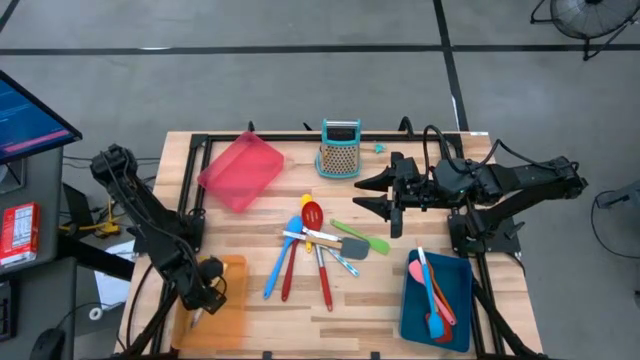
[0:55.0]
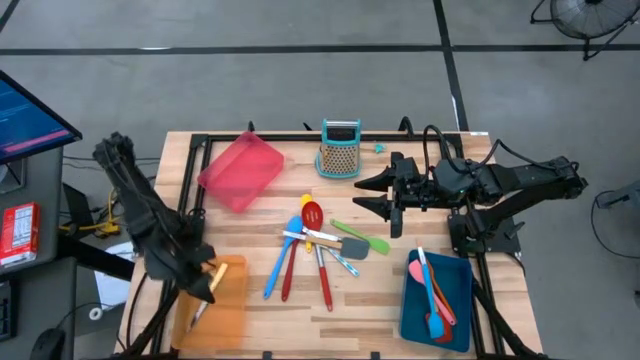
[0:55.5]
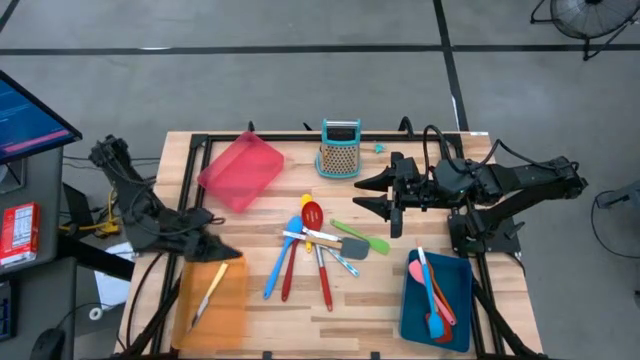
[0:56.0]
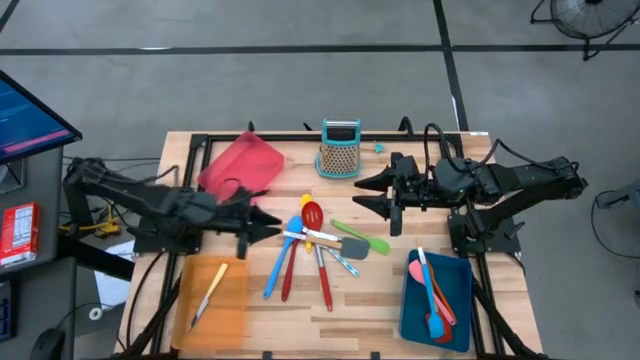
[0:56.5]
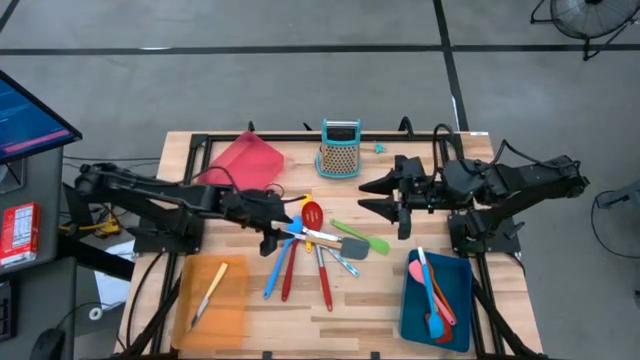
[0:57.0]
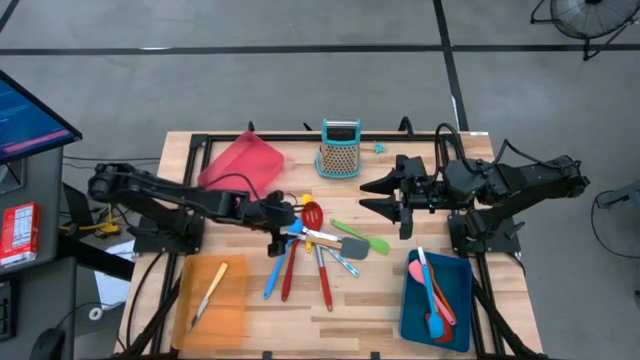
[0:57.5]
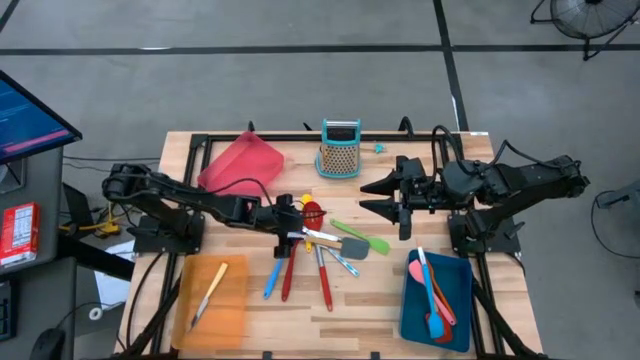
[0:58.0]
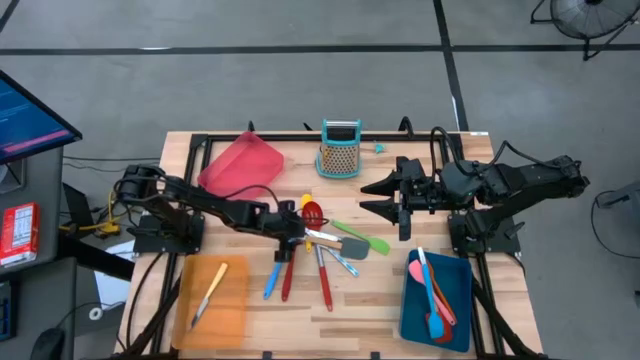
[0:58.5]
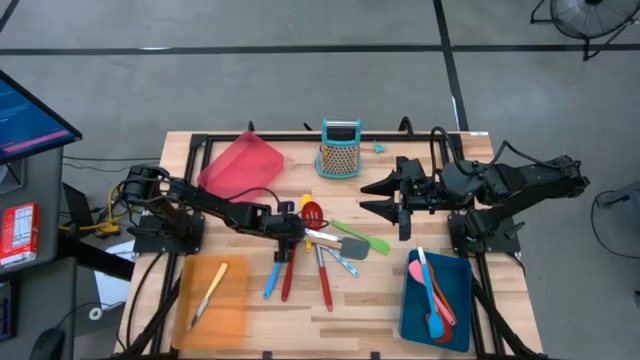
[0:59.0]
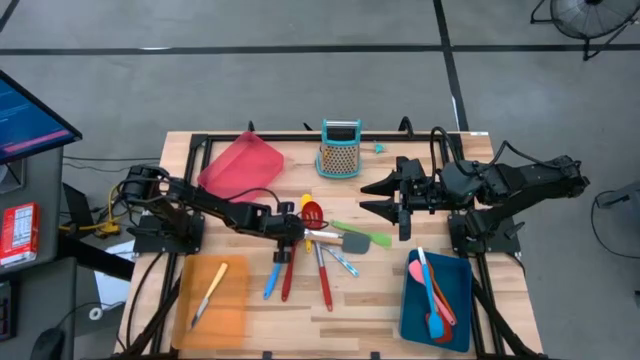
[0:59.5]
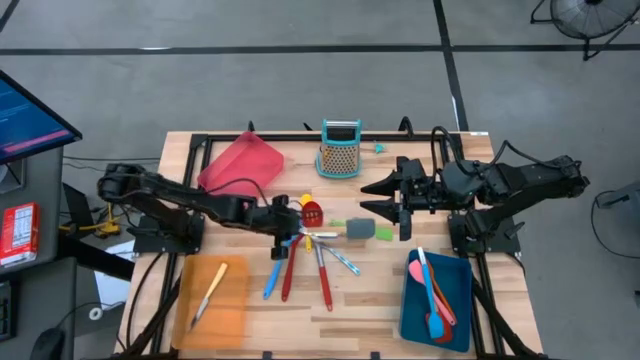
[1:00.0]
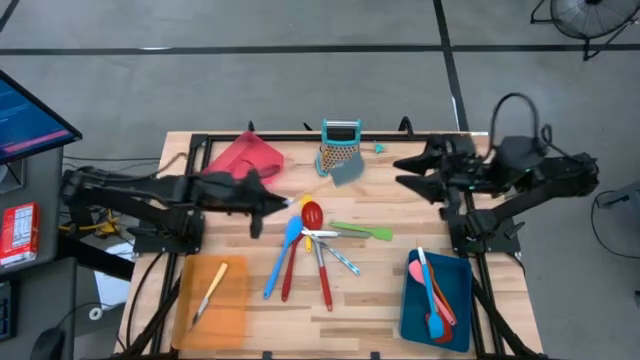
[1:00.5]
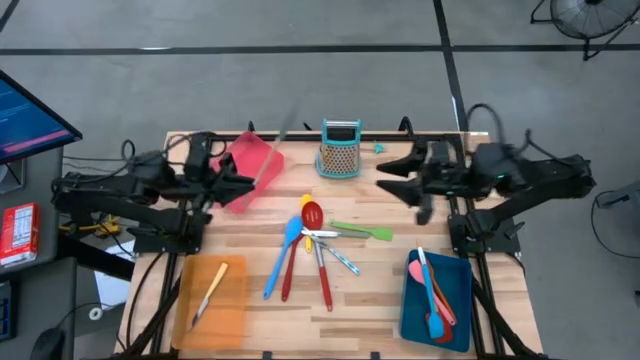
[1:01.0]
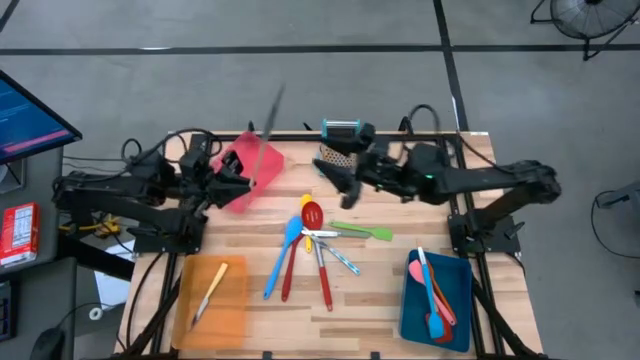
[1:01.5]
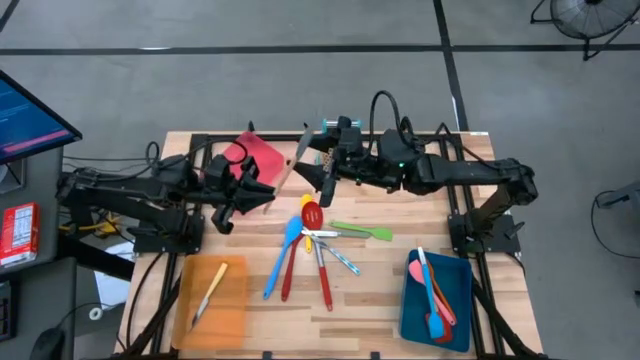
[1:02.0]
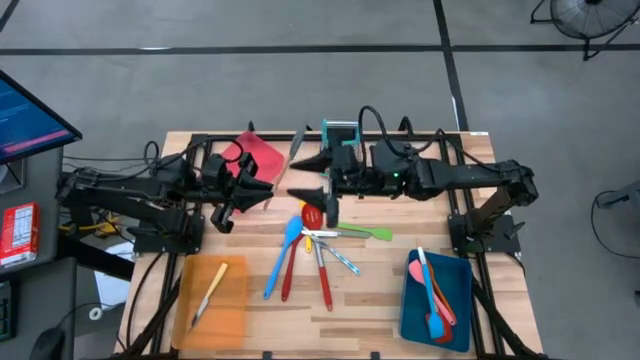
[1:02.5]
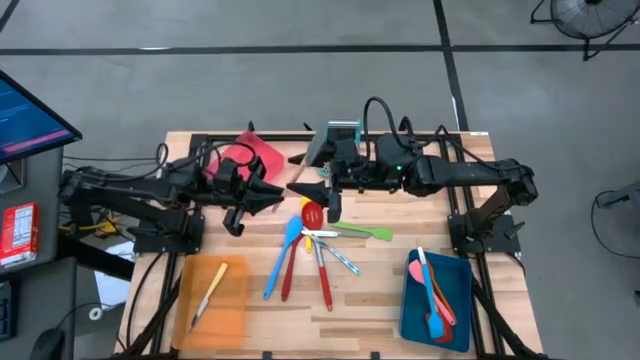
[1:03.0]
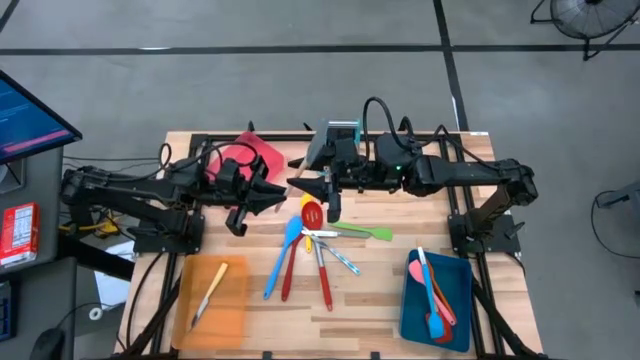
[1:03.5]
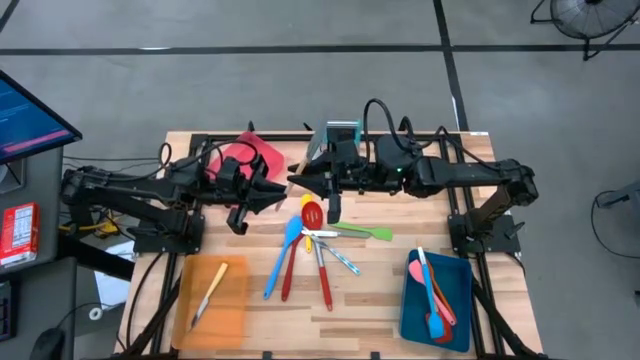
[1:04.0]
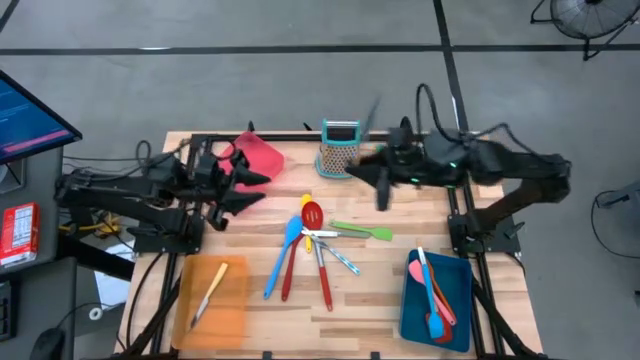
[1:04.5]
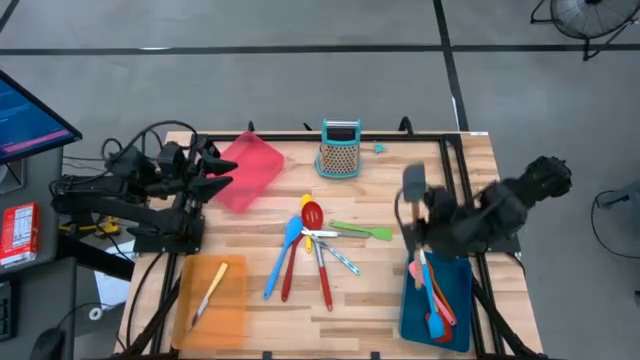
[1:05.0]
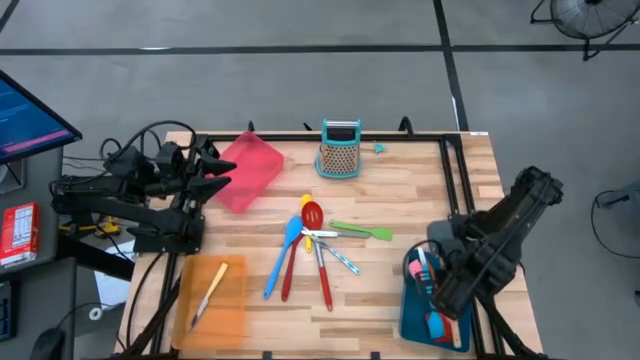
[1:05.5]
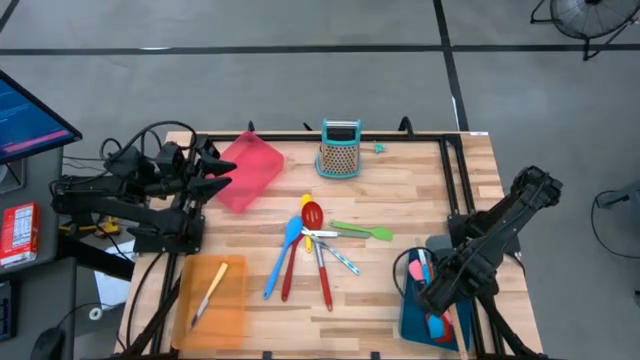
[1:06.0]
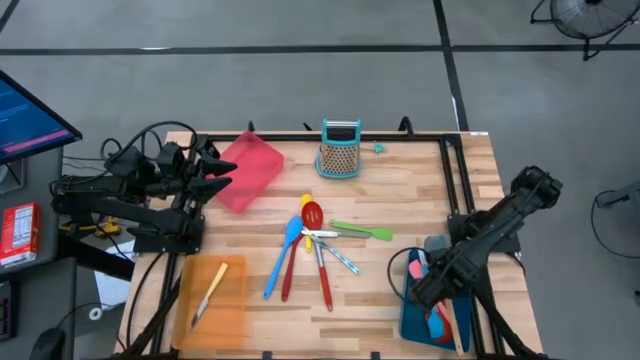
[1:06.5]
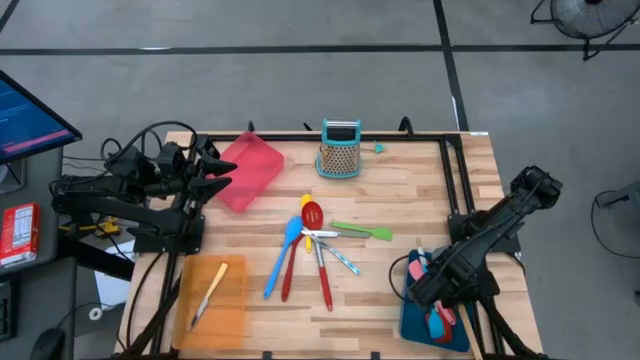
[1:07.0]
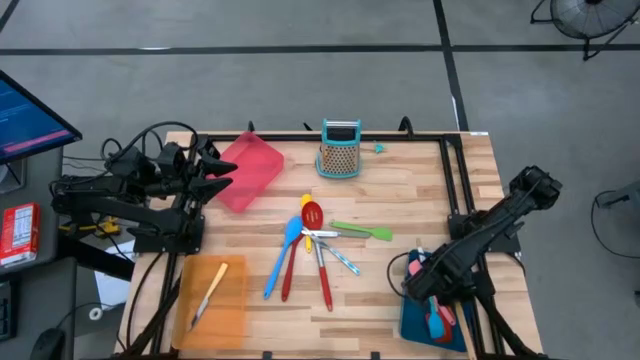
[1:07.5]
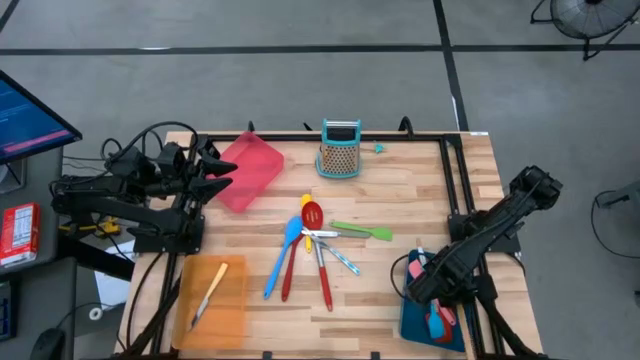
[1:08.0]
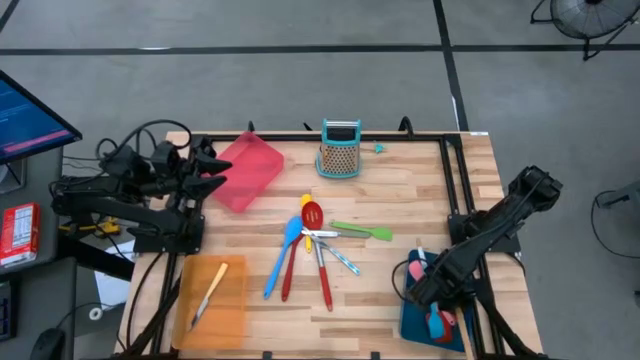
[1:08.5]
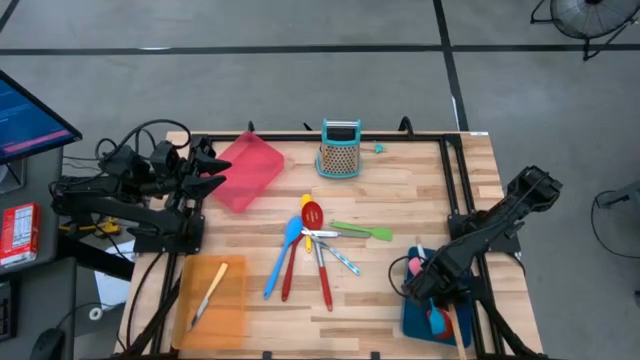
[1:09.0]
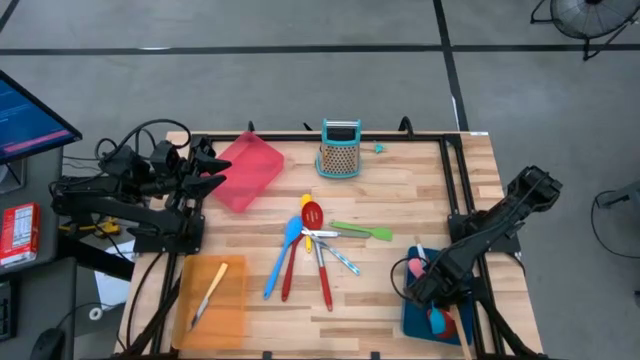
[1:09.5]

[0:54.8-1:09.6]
Task: Pick & Place Kitchen Items
Put the gray spatula into the blue bin

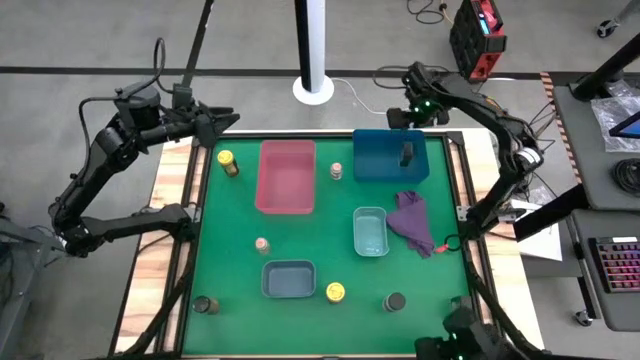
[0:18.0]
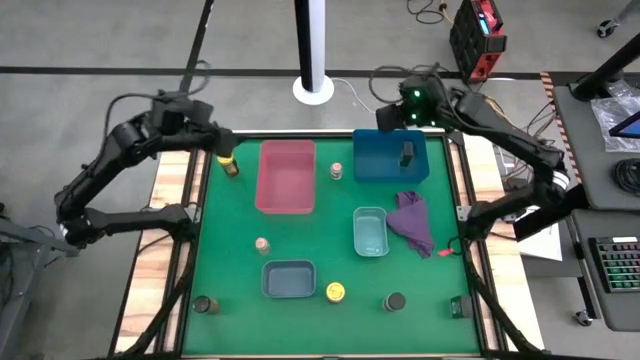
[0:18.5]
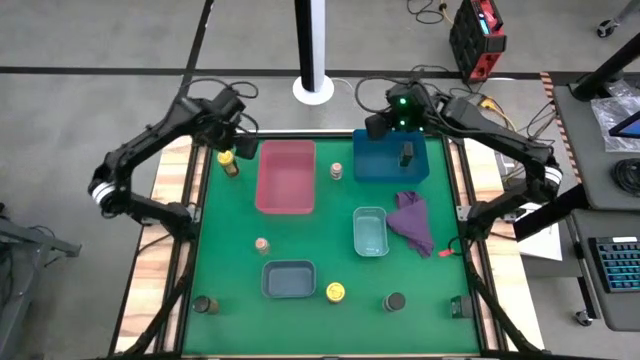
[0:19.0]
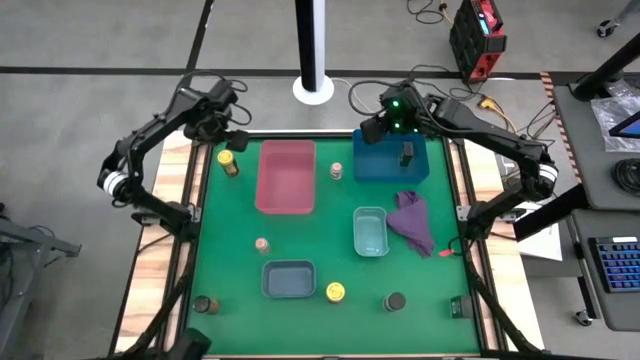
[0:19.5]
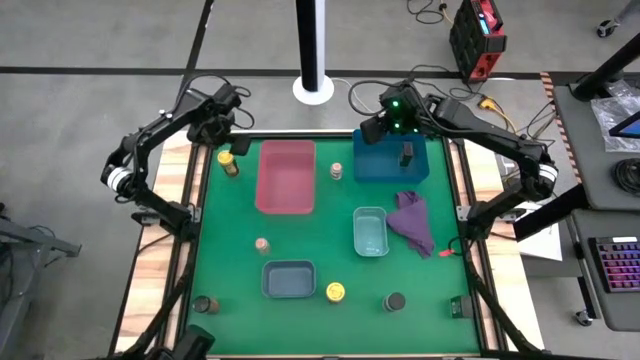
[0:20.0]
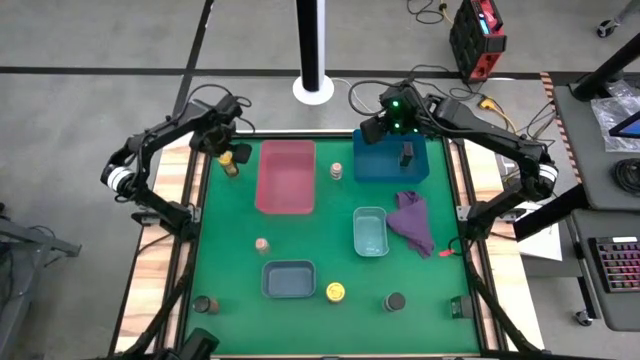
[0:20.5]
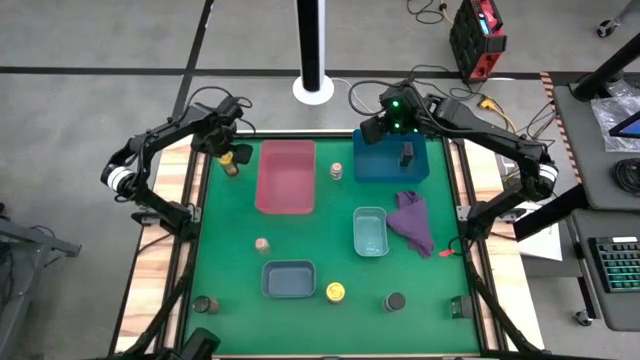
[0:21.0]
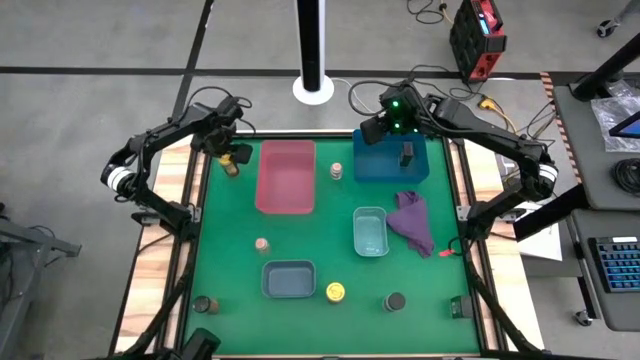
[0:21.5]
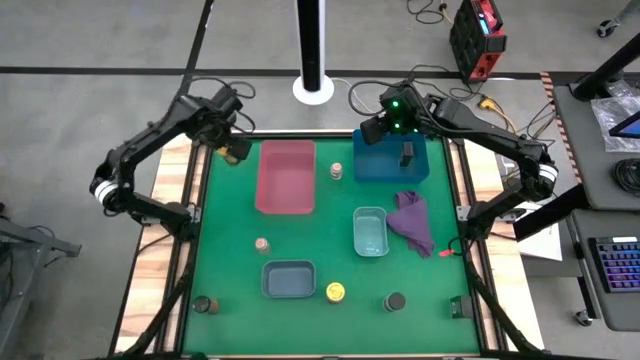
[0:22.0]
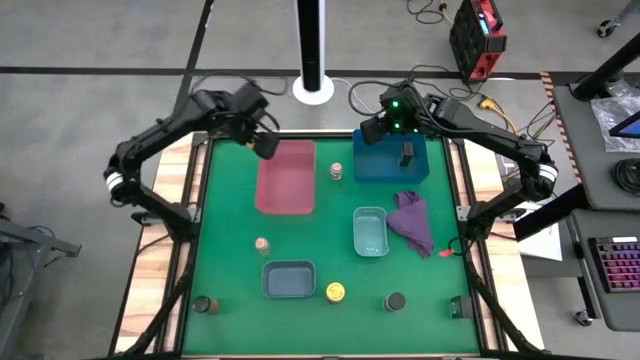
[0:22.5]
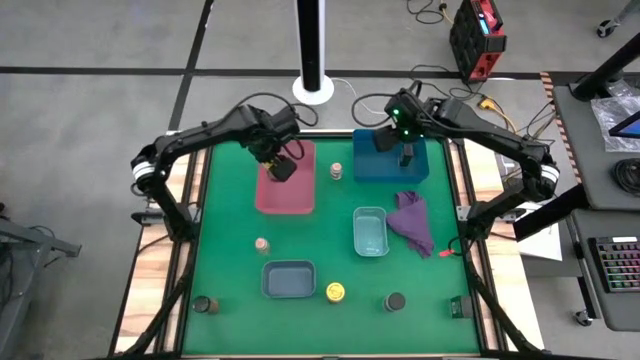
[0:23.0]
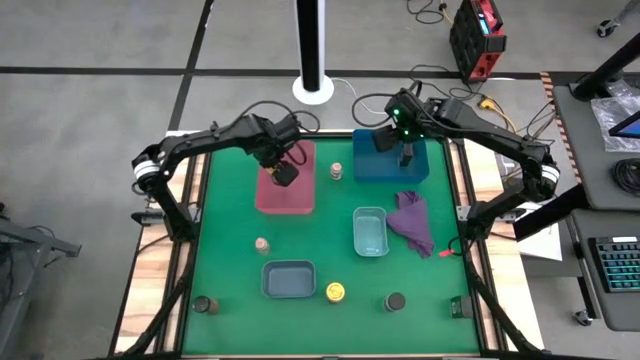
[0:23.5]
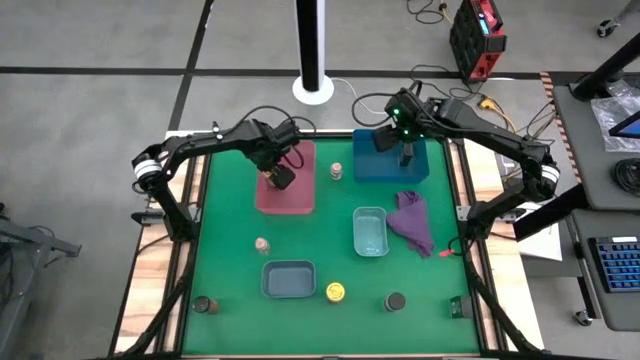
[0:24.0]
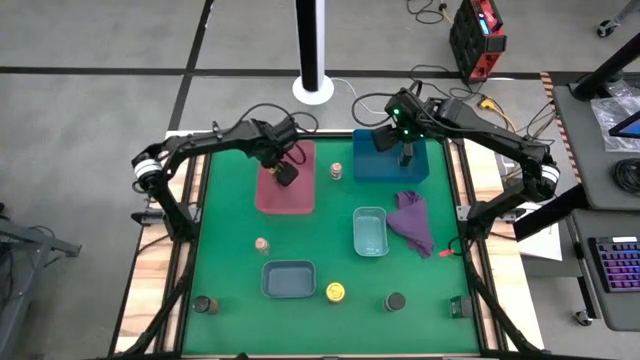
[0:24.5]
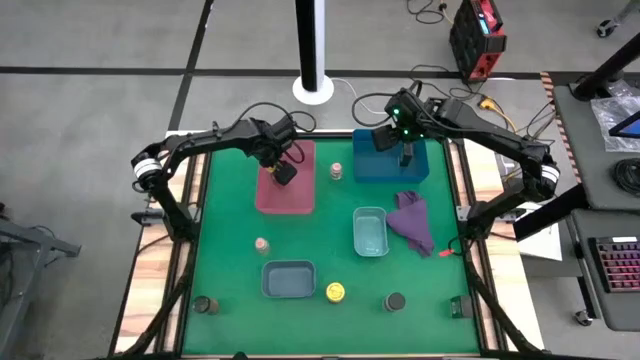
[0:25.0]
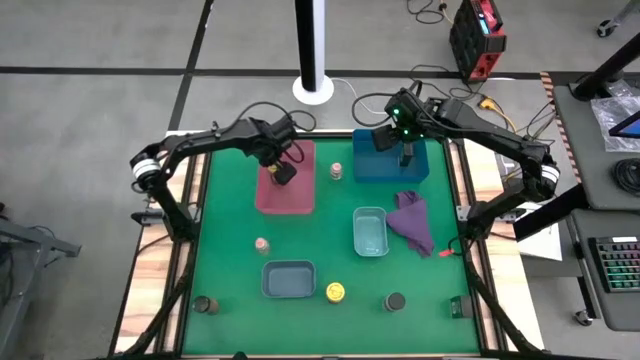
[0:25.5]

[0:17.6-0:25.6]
Task: Sort spices by type
Put the top yellow seasoning bottle into the large pink bin
